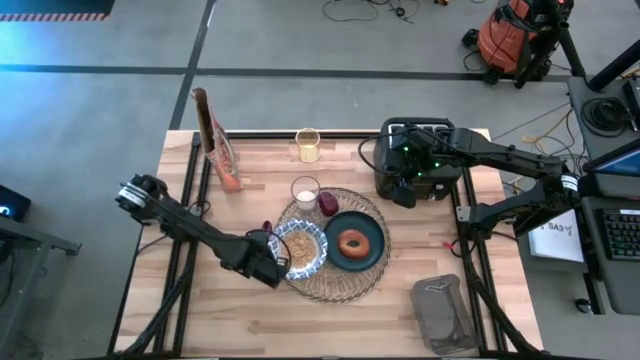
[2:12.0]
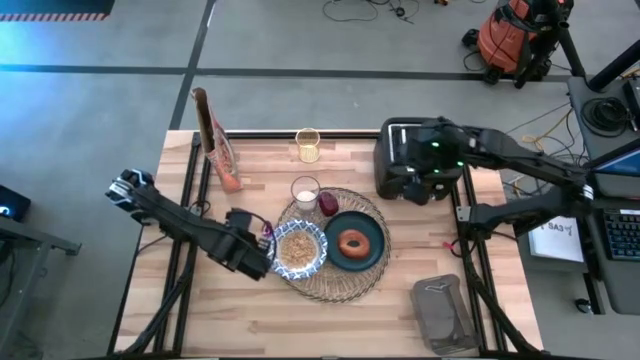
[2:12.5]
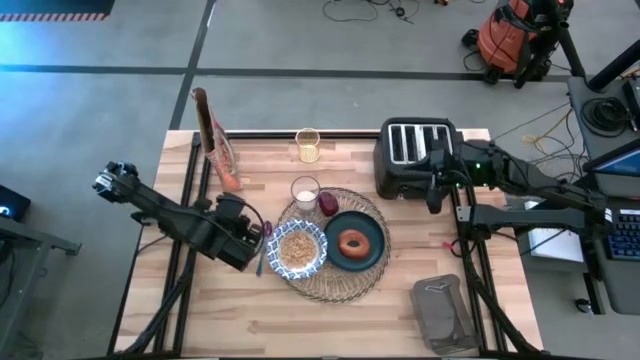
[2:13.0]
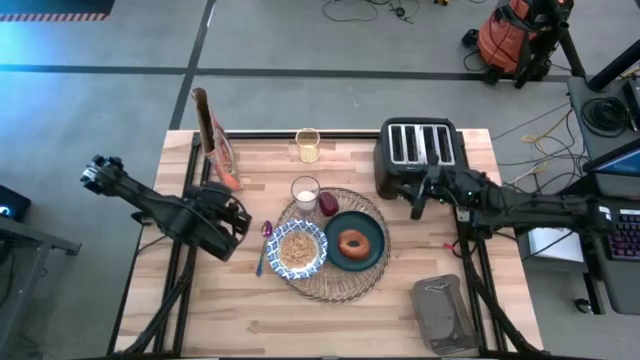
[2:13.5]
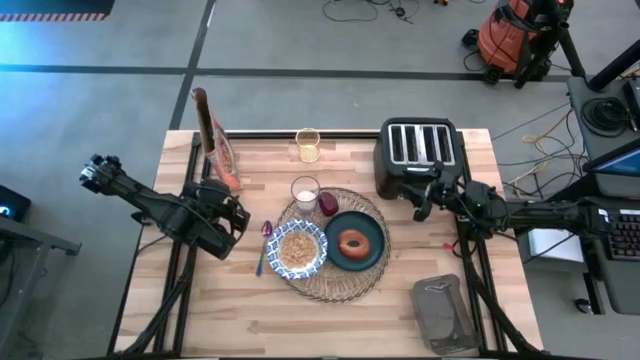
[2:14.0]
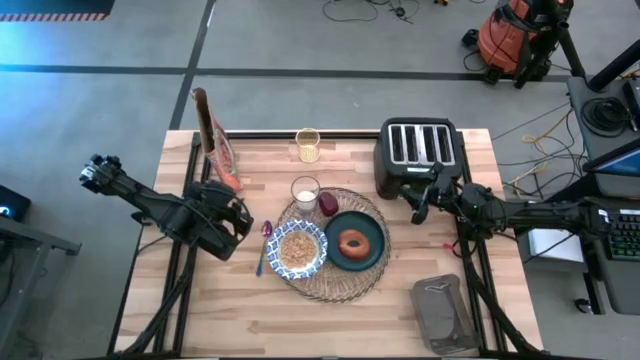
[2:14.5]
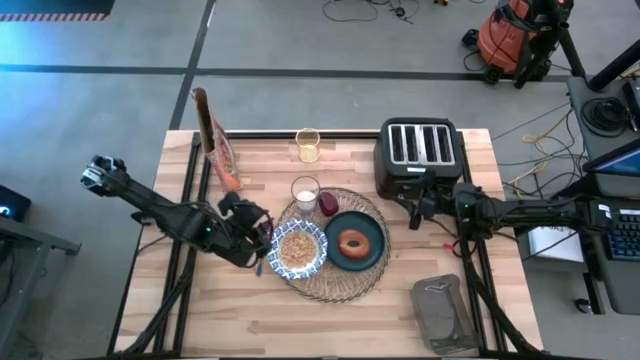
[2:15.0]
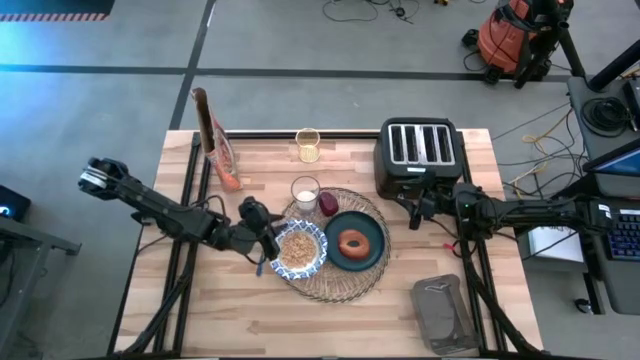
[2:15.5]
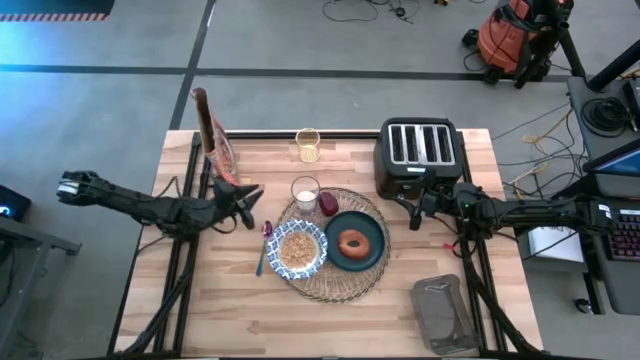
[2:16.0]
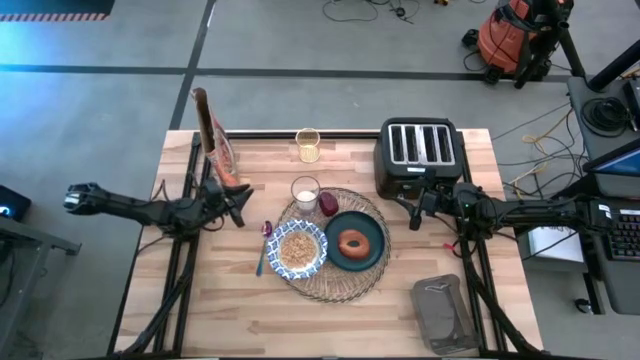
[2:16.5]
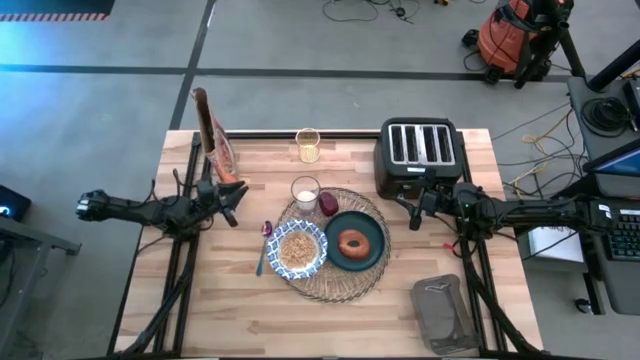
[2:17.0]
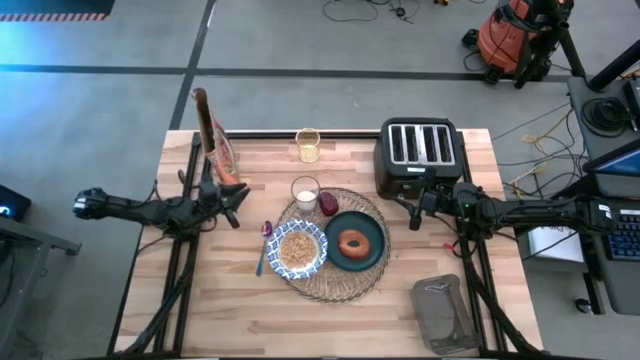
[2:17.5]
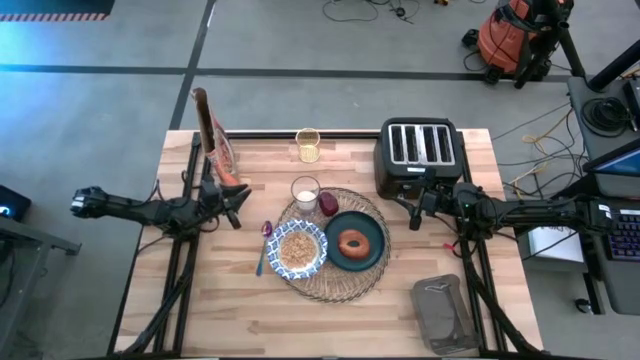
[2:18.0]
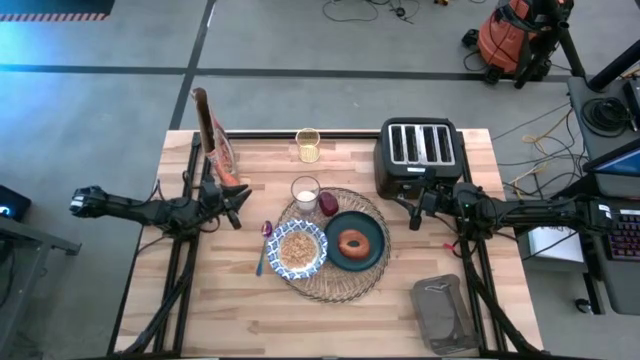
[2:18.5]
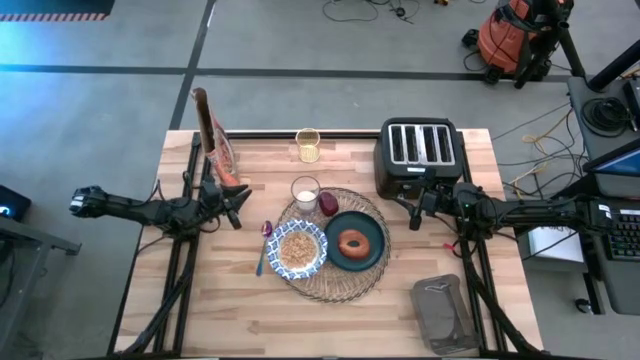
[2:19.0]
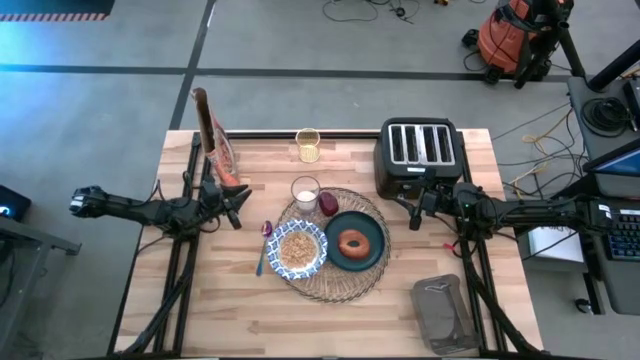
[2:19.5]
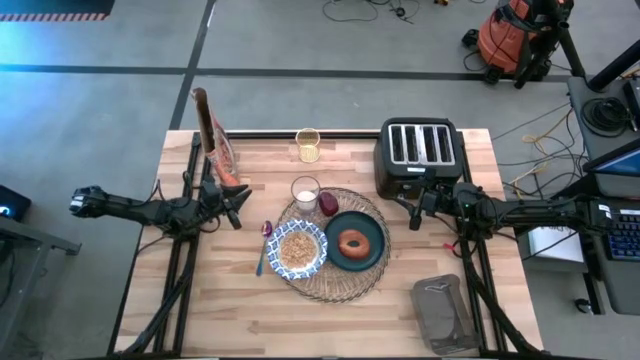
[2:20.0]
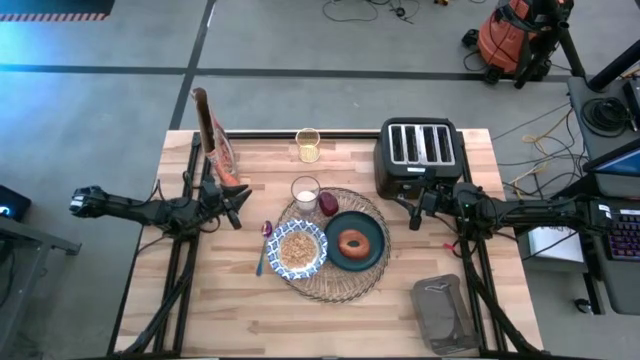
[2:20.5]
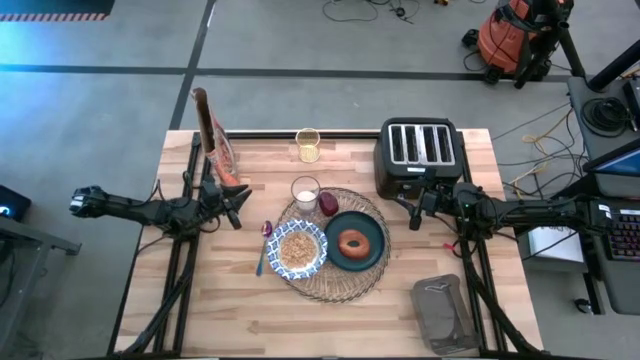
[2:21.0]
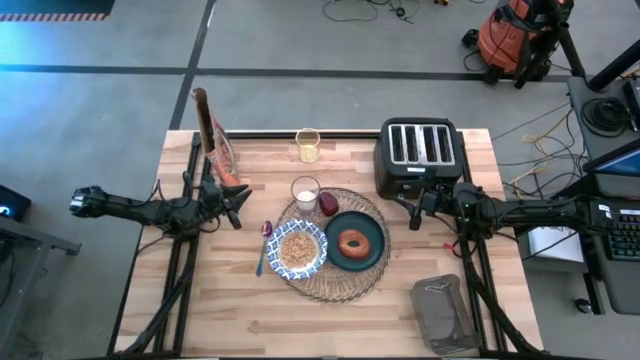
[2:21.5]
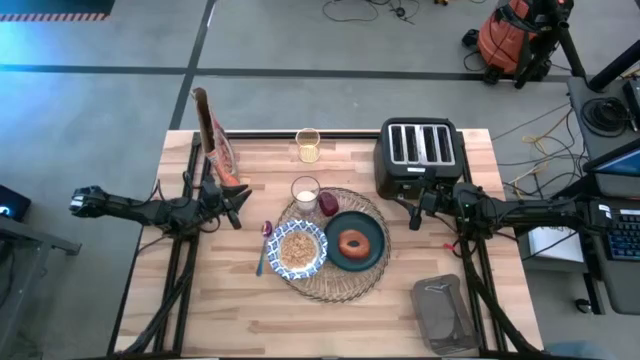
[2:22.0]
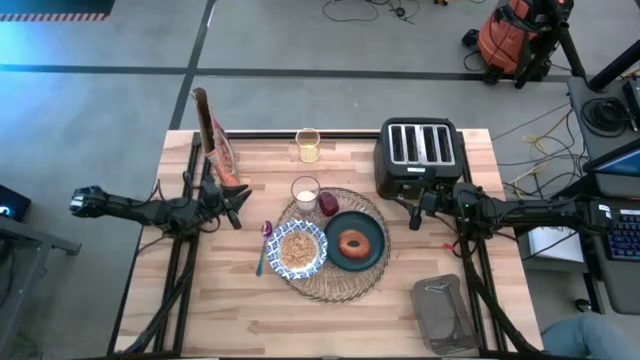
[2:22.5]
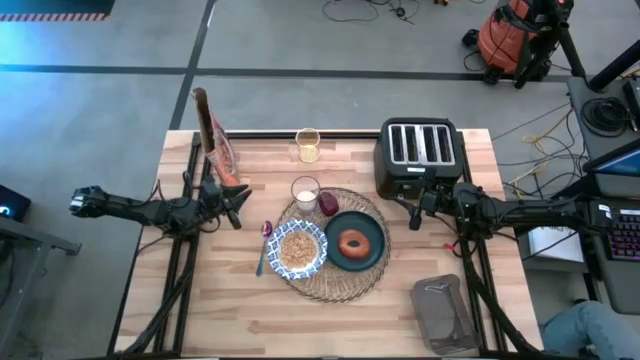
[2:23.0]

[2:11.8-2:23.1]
Task: Arrange a breakfast setting
Return to Home Position

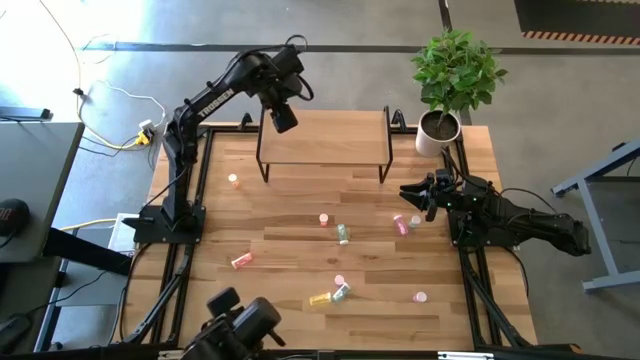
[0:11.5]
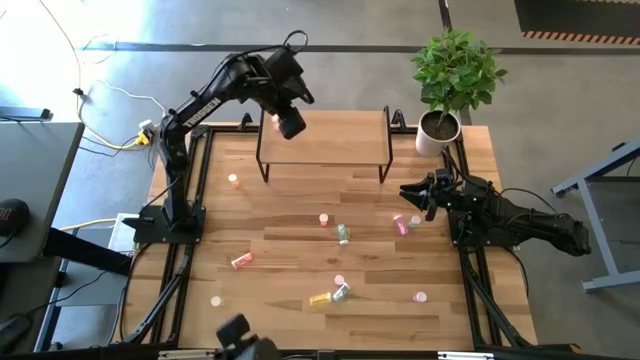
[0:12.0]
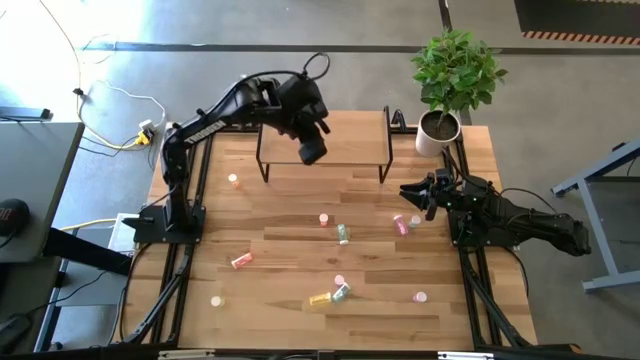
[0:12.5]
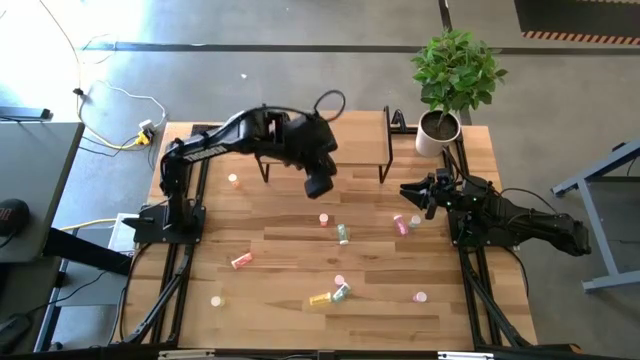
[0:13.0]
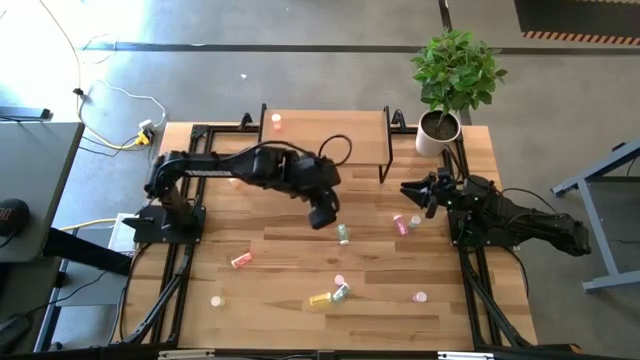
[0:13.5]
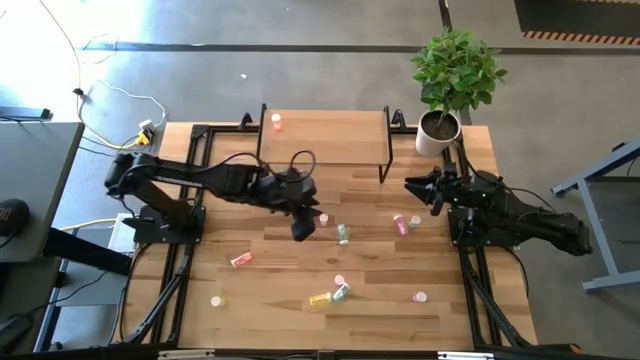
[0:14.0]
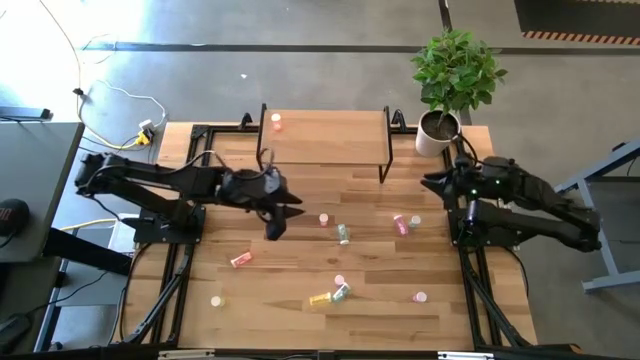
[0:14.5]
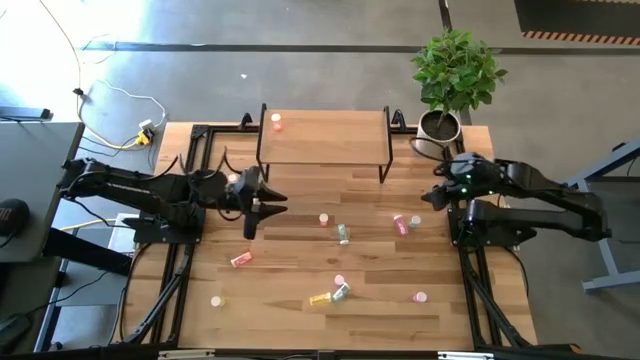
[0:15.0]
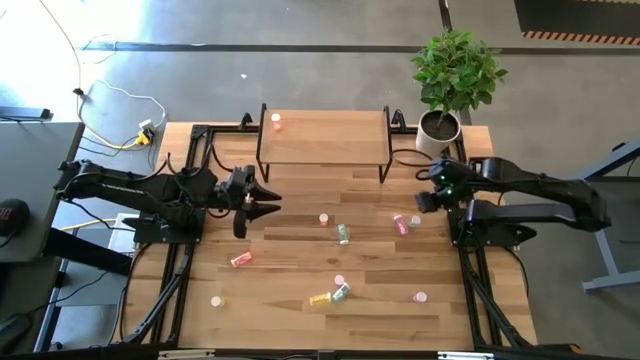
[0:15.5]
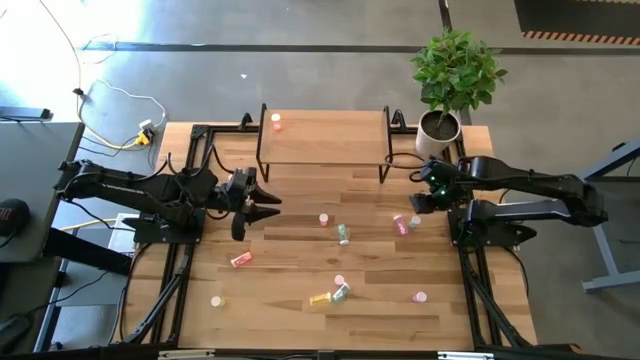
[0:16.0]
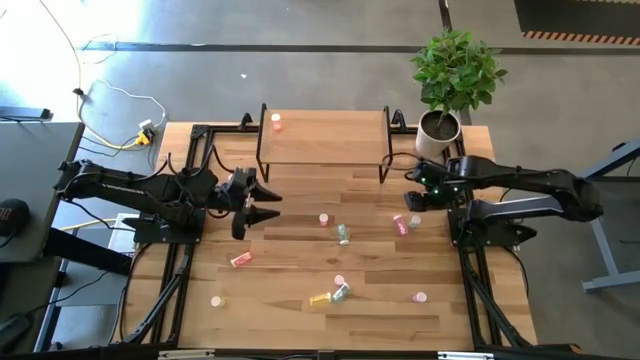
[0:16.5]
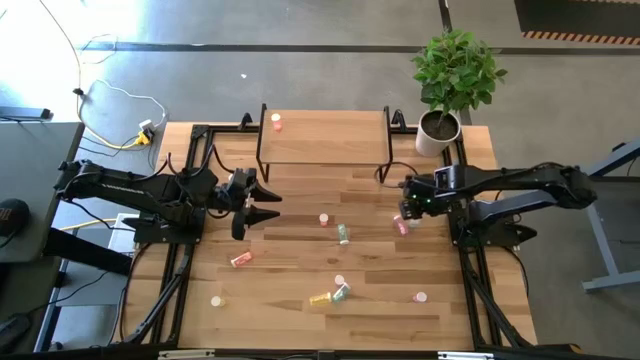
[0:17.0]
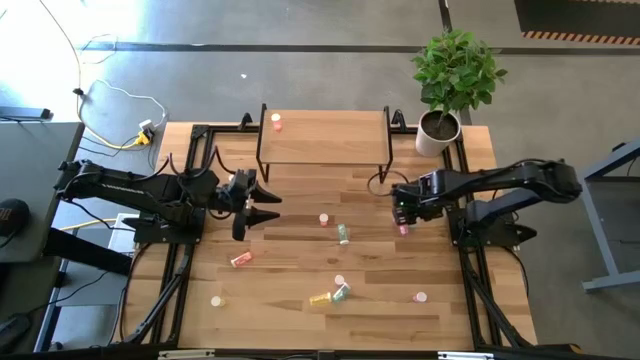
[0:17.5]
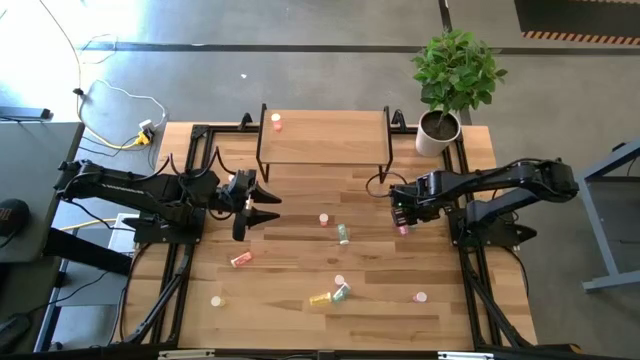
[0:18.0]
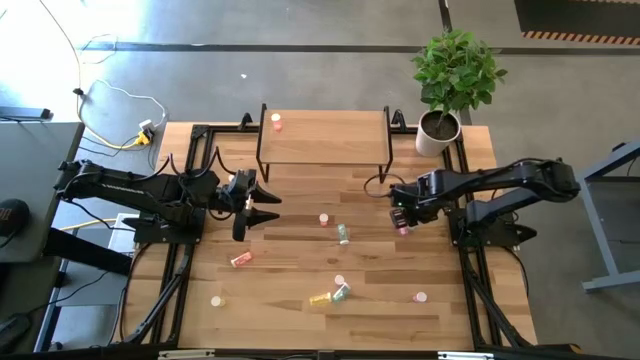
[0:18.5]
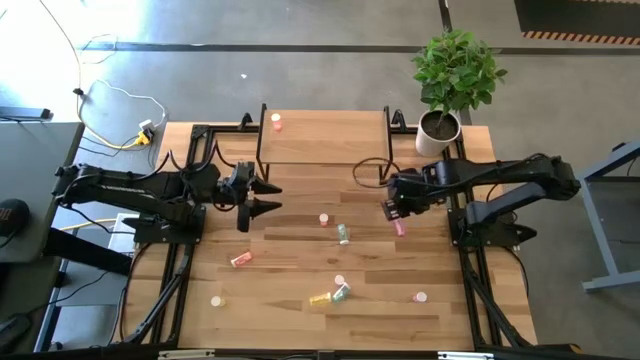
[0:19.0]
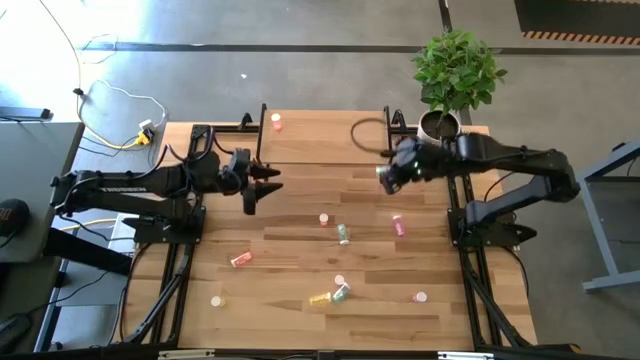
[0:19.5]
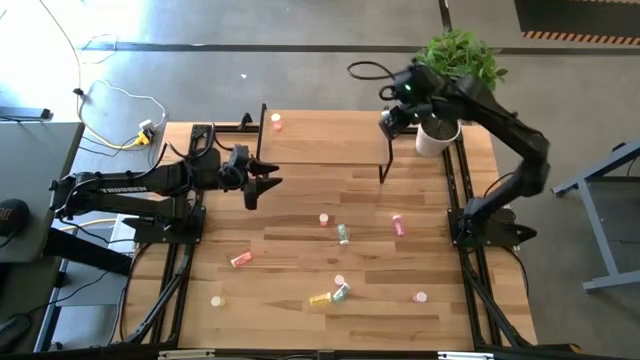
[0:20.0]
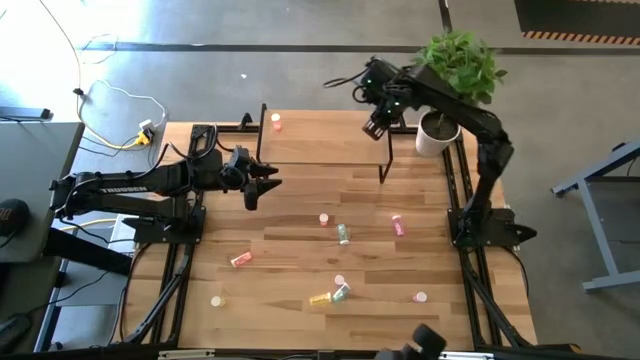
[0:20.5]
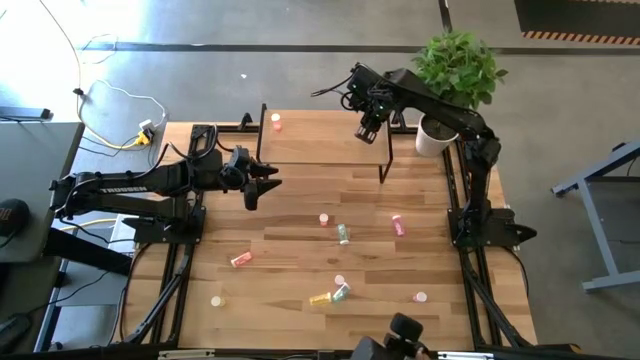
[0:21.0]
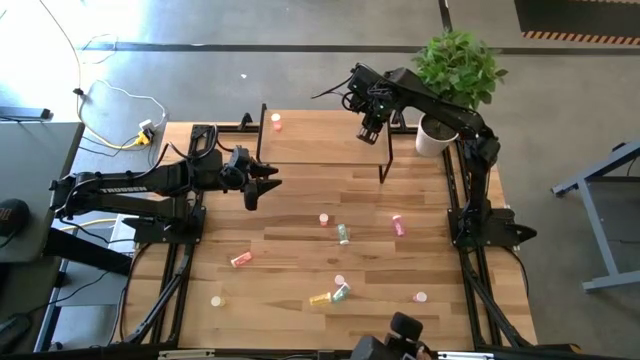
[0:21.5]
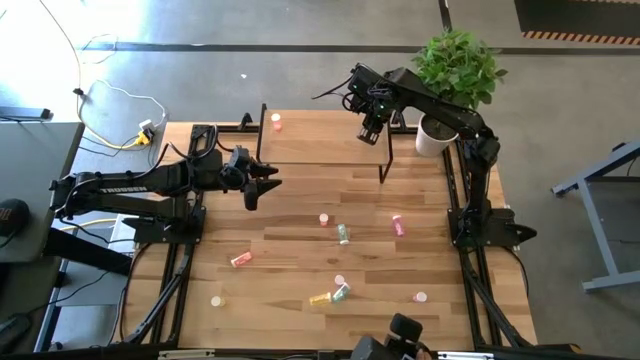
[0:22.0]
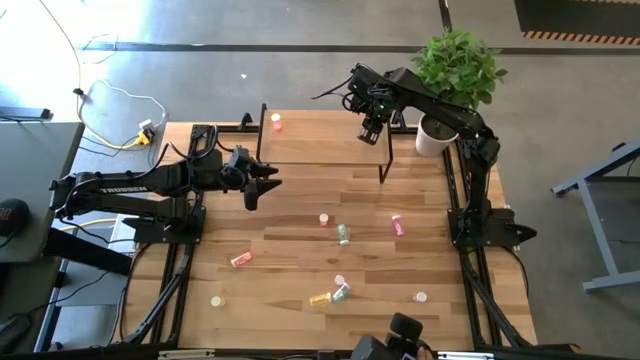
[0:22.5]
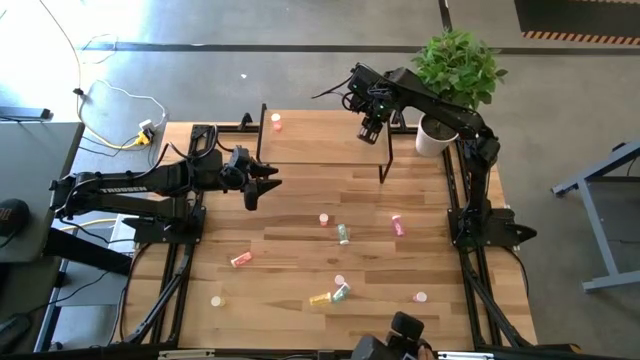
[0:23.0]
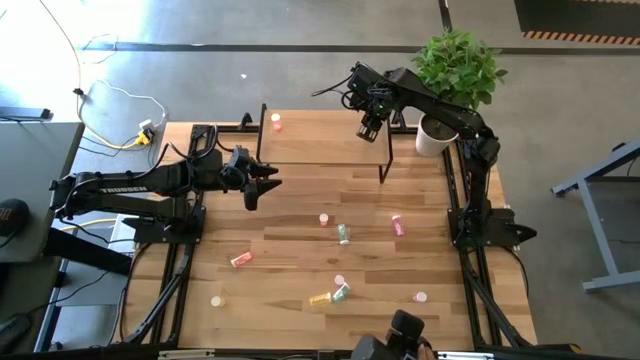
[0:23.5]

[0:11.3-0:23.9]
Task: Pick and place medicine bottles onto shelf by color
Put the top right blue pill bottle on the shelf
